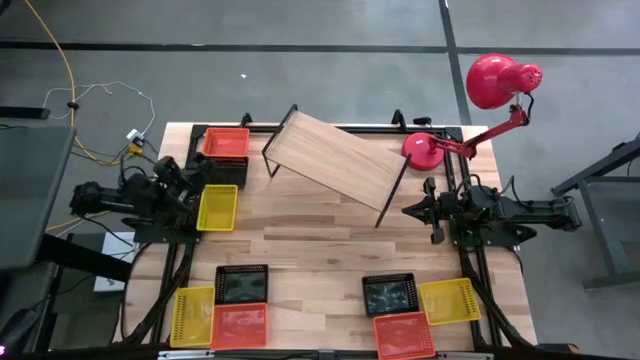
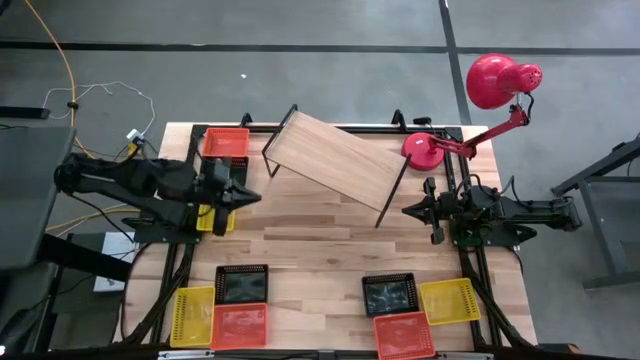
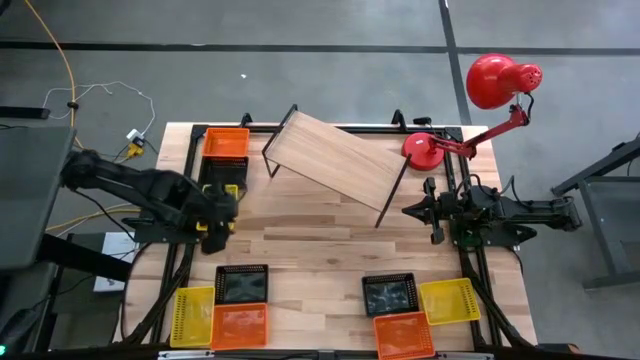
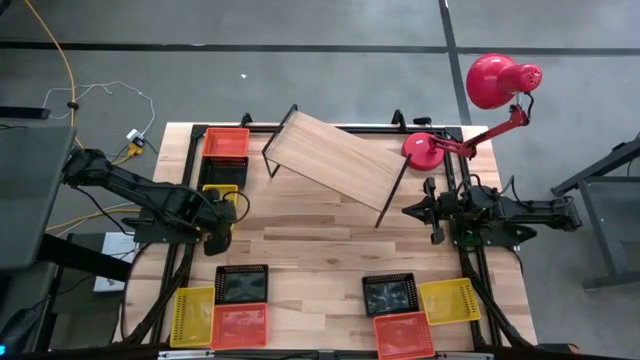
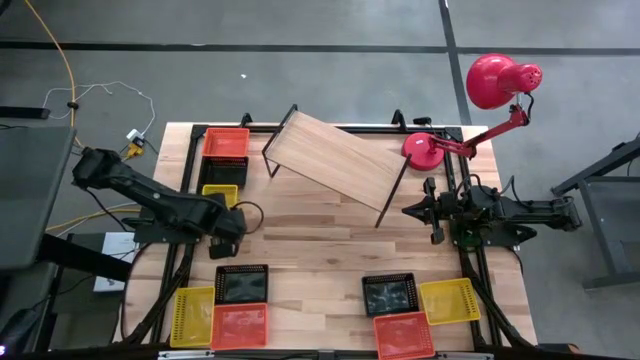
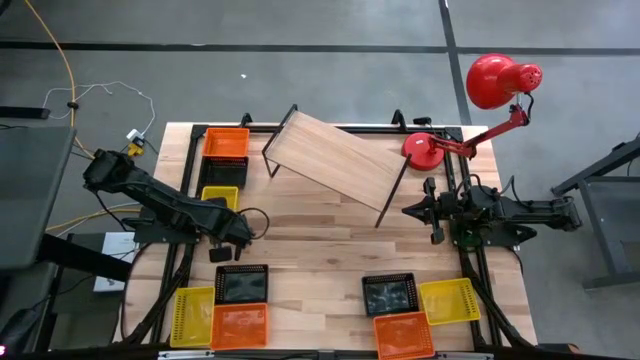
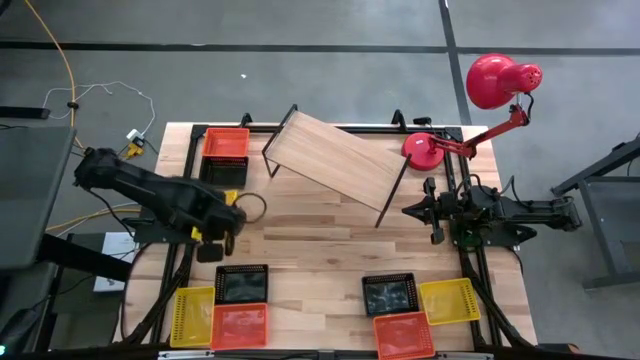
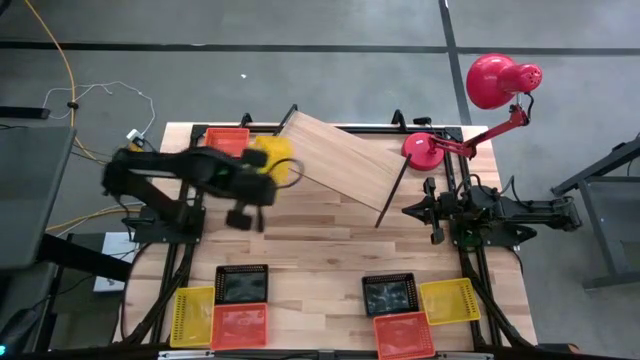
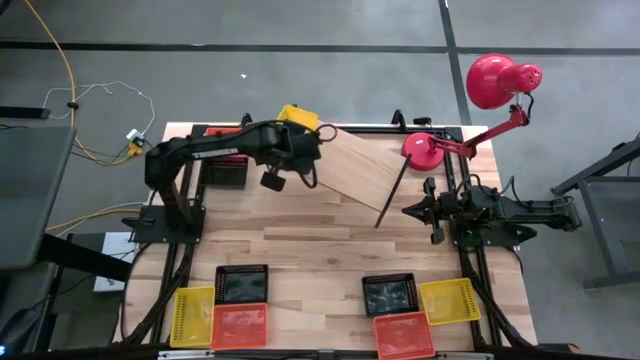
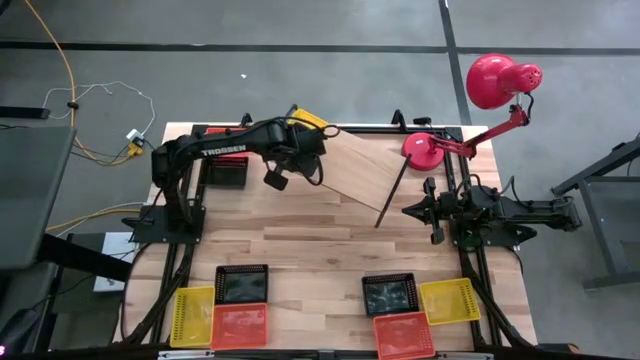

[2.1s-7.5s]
Task: Stack baskets on shelf by color
Put the top yellow bin on the shelf

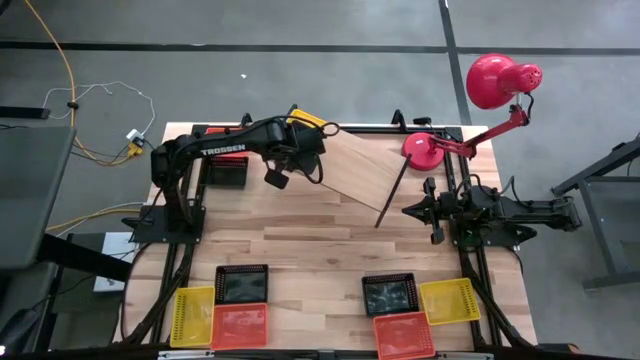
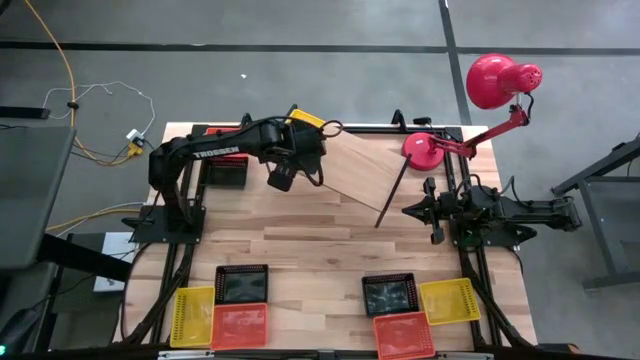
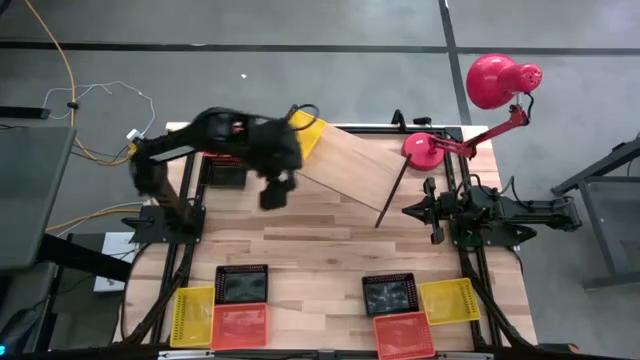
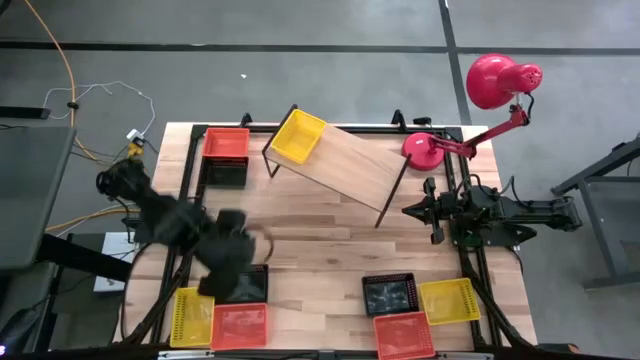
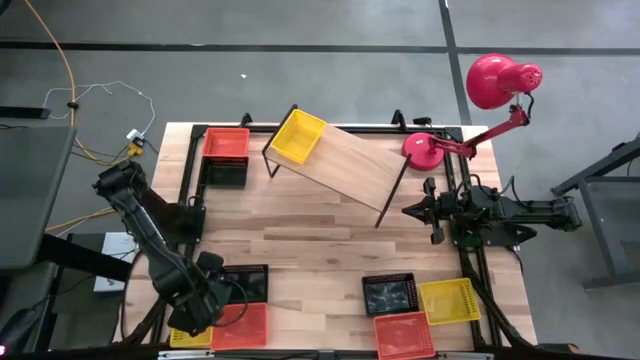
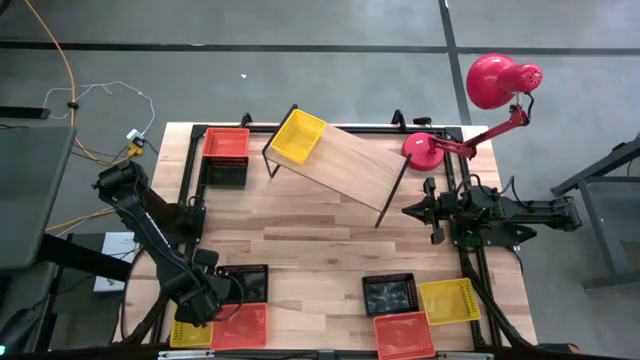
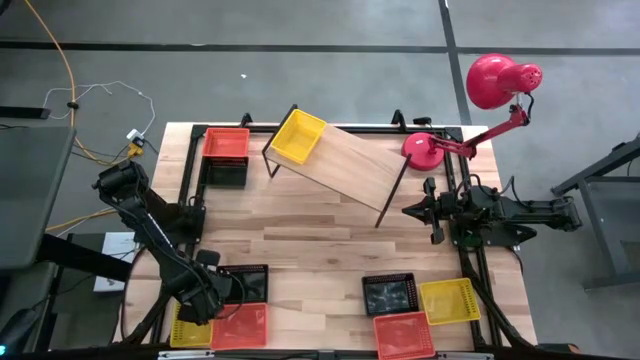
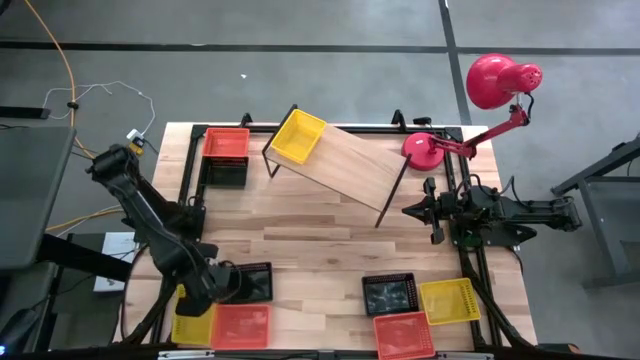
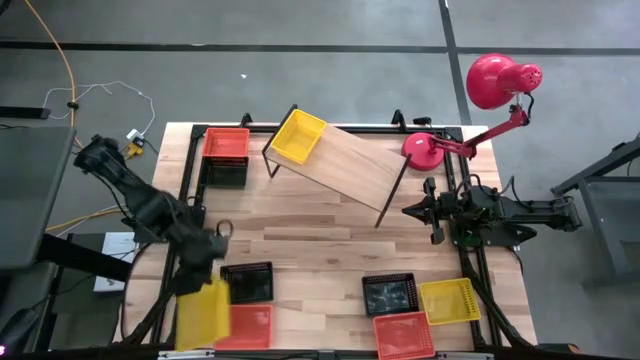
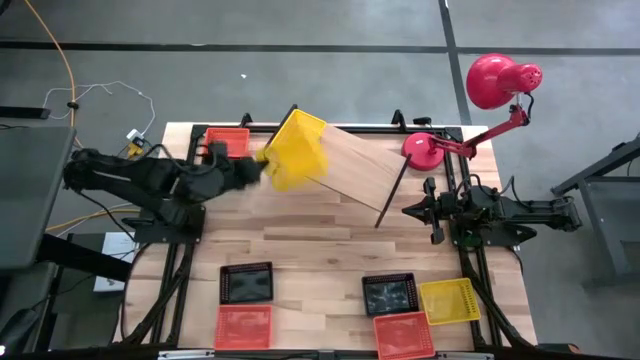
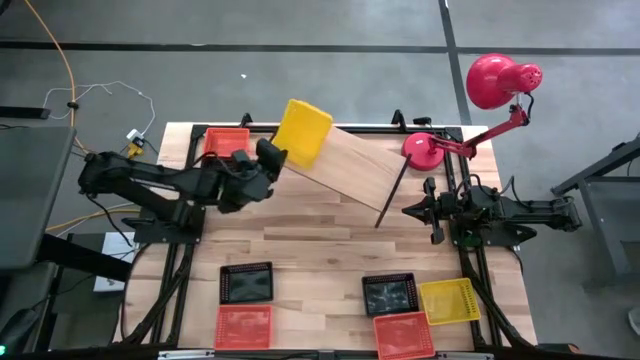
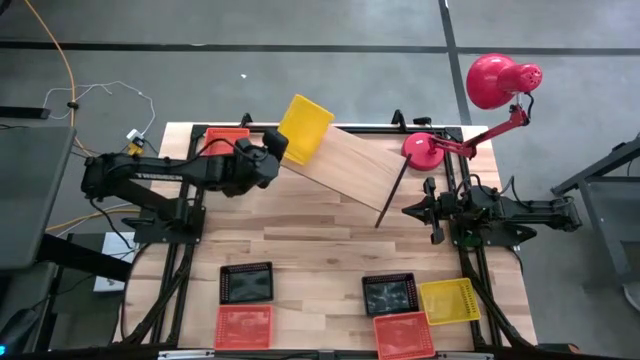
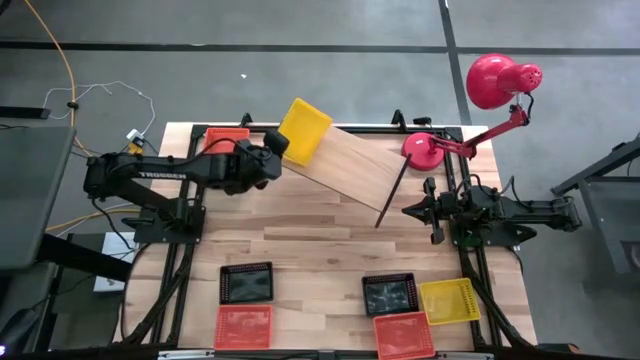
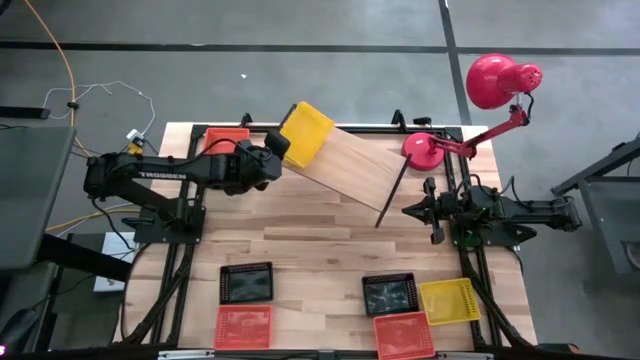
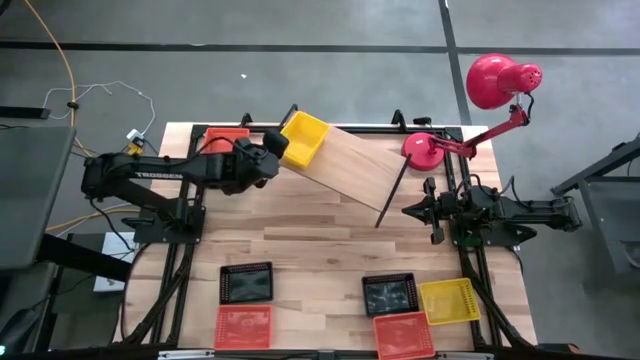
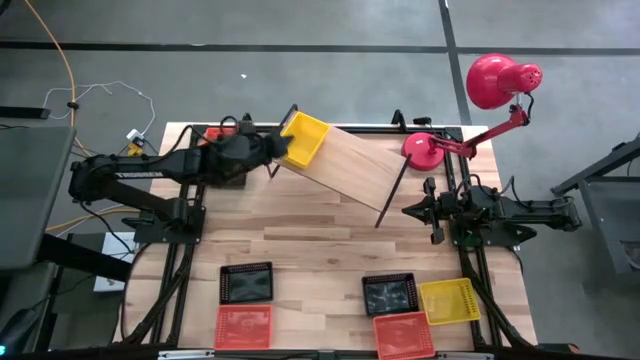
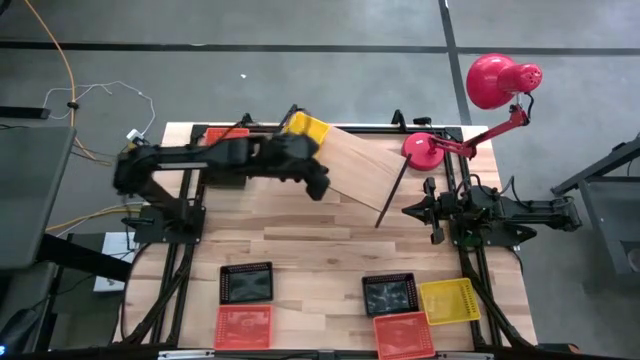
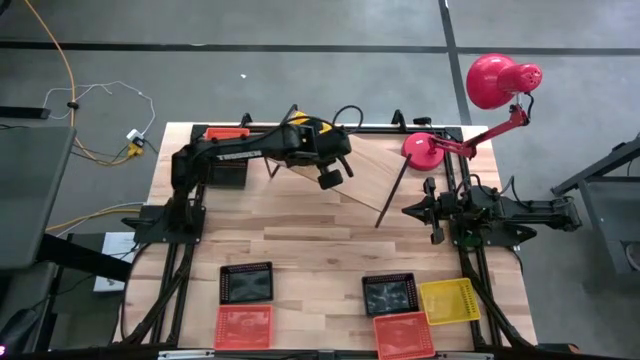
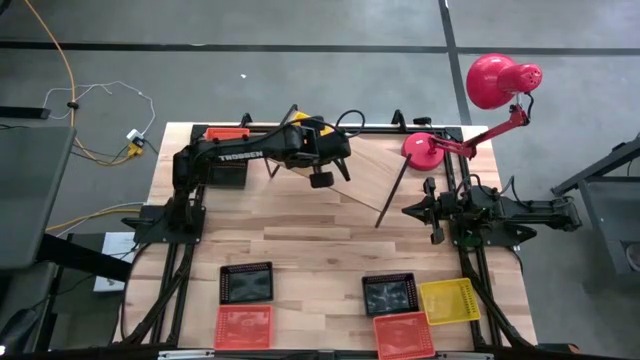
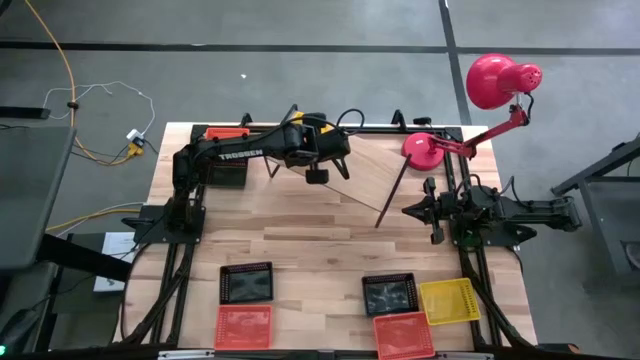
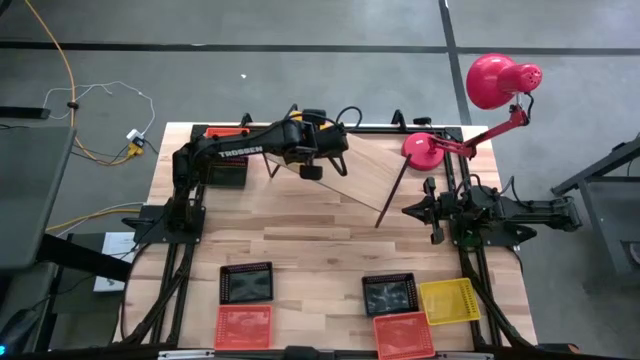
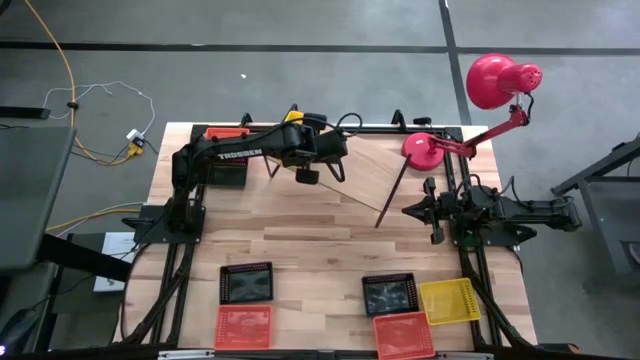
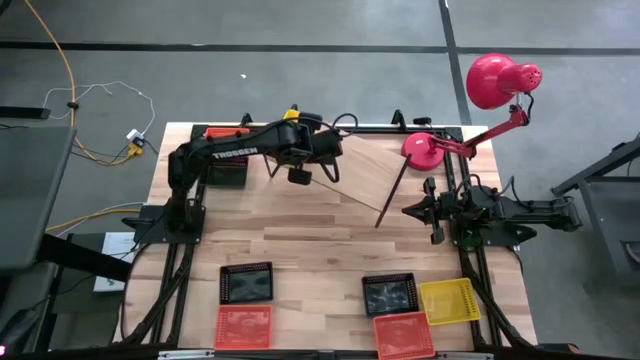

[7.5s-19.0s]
Stack the left yellow bin on top of the yellow bin on the shelf

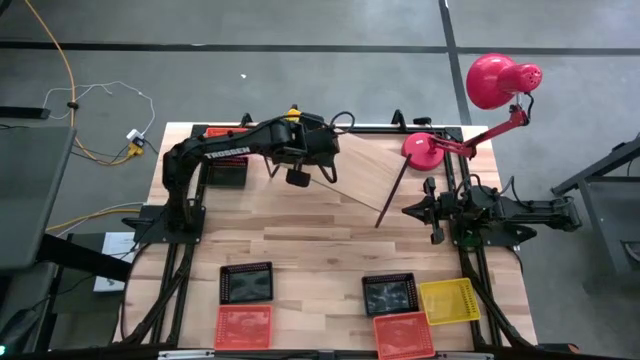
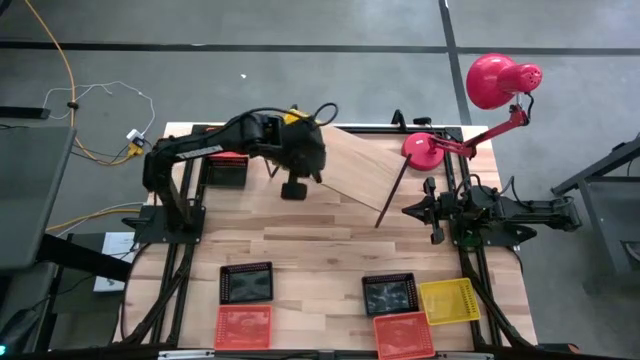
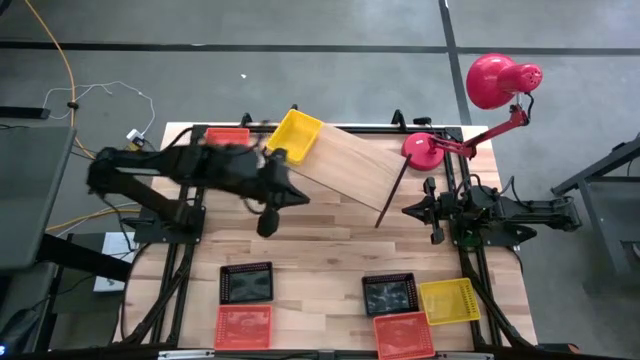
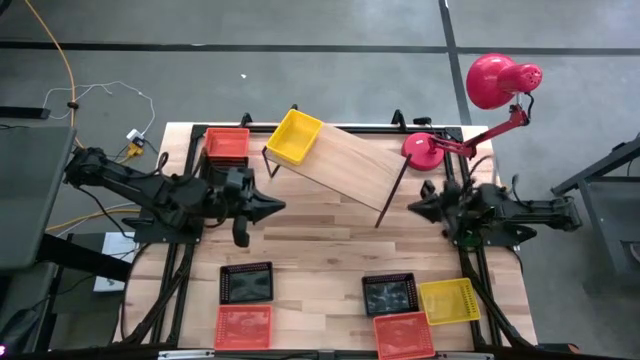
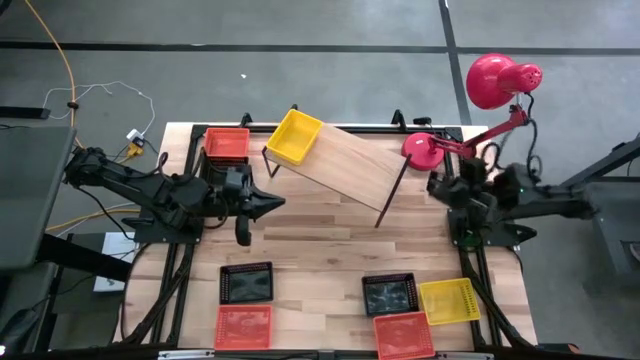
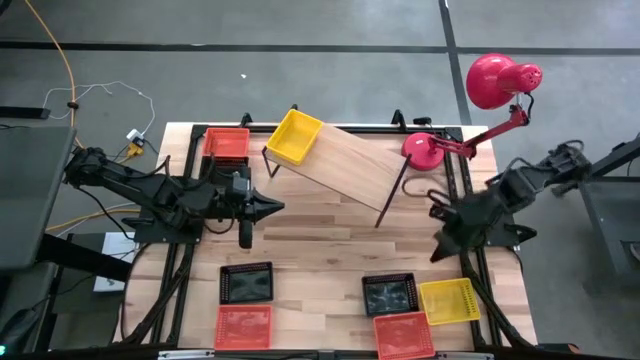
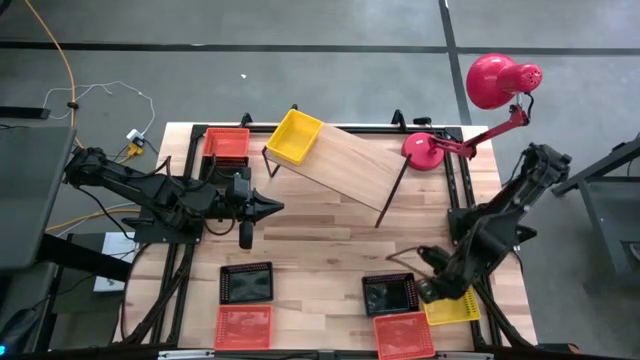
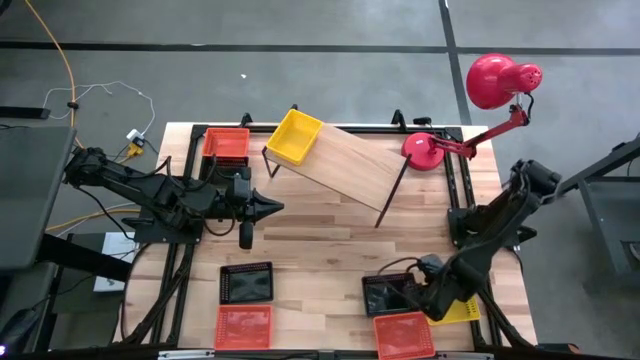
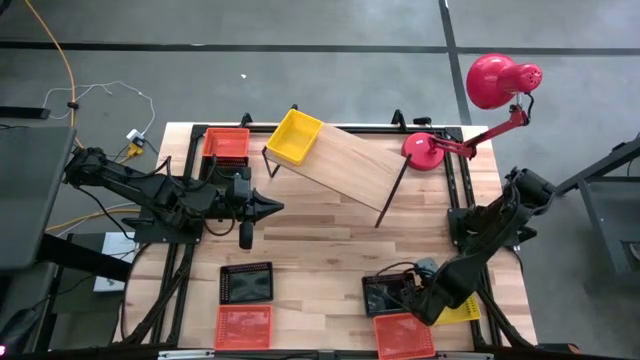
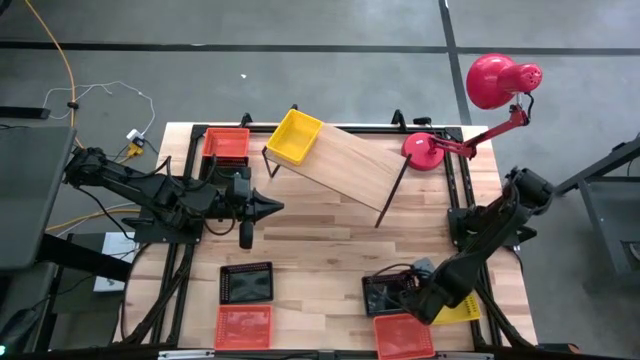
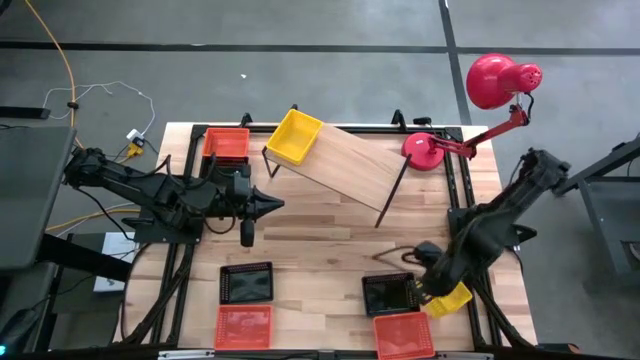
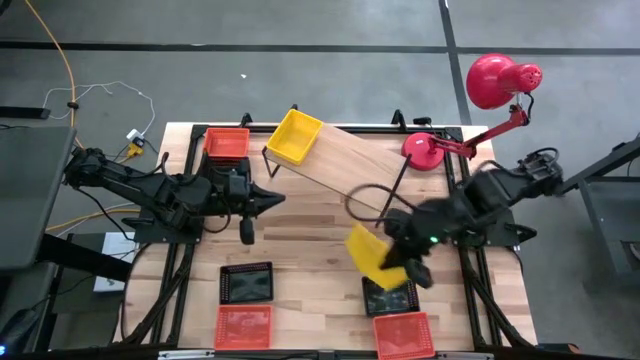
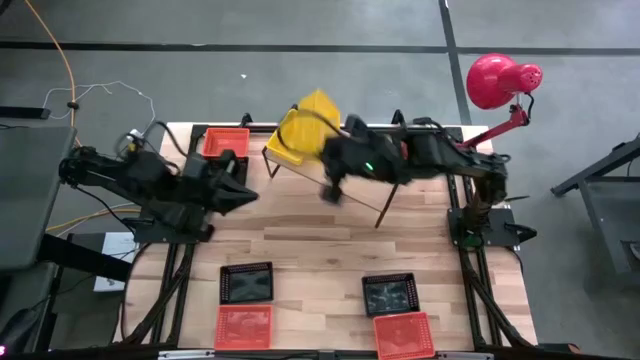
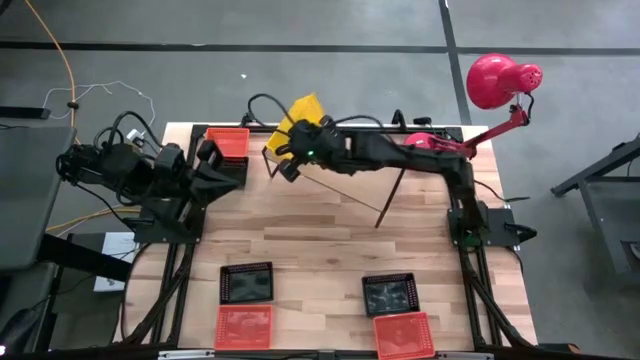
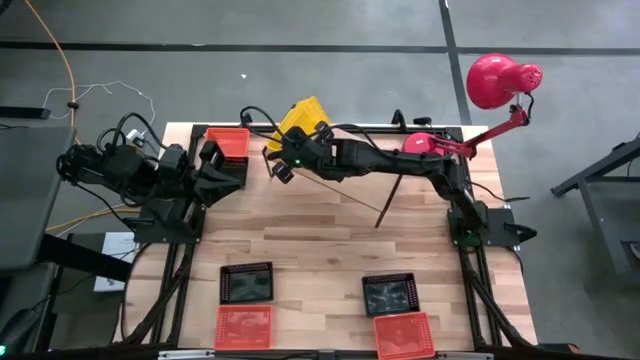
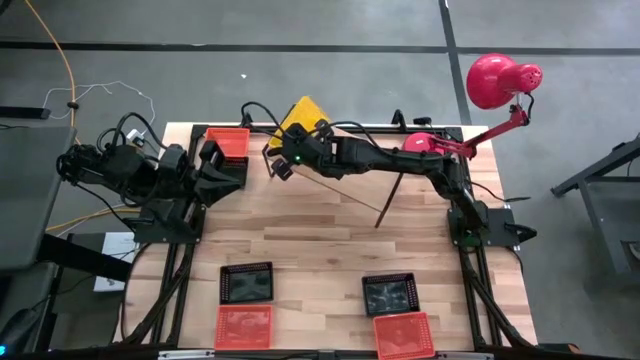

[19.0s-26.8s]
Stack the yellow bin on top of the yellow bin on the shelf
